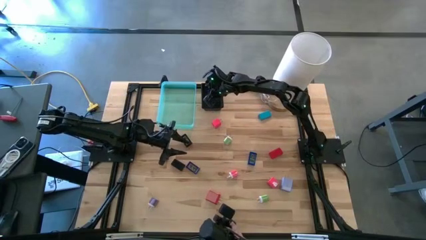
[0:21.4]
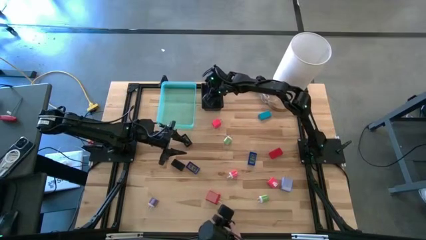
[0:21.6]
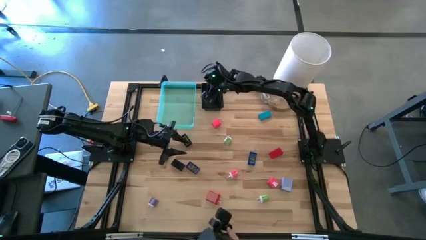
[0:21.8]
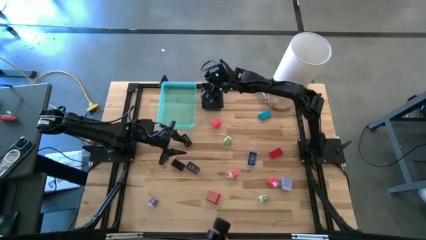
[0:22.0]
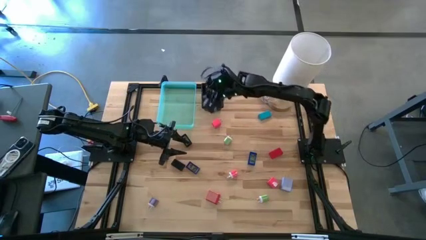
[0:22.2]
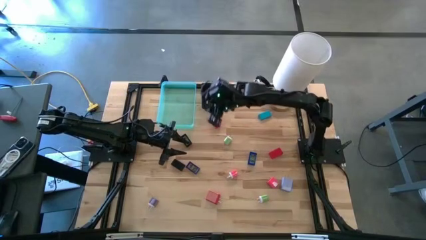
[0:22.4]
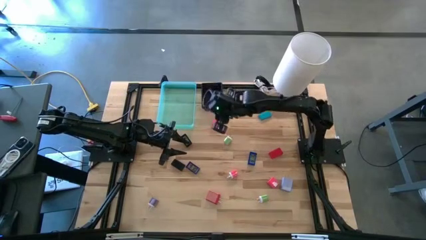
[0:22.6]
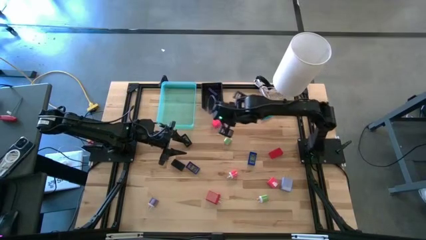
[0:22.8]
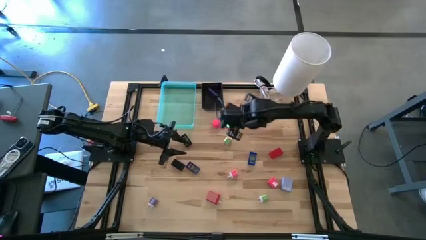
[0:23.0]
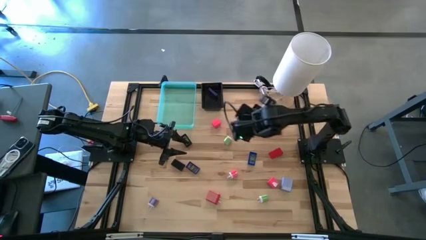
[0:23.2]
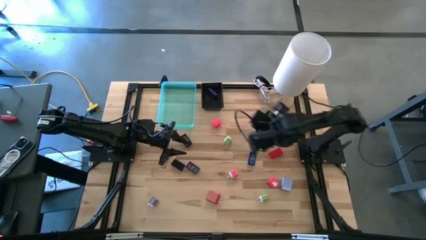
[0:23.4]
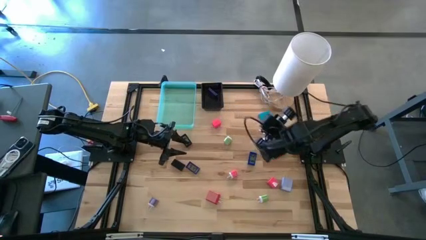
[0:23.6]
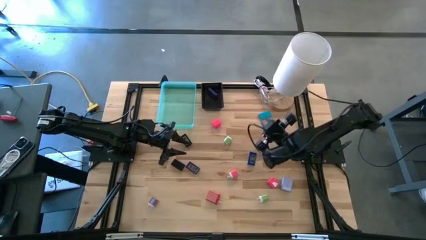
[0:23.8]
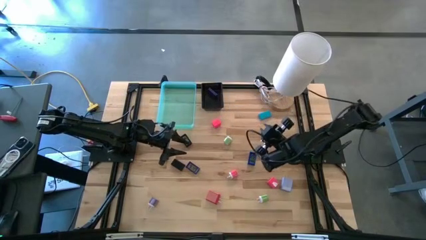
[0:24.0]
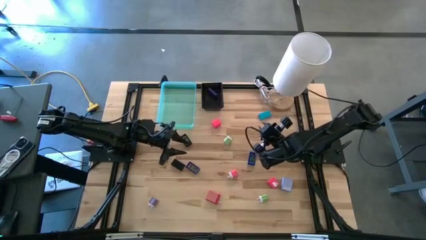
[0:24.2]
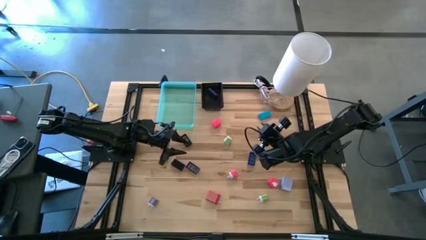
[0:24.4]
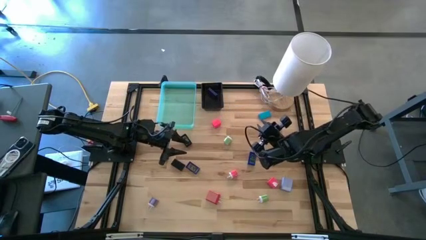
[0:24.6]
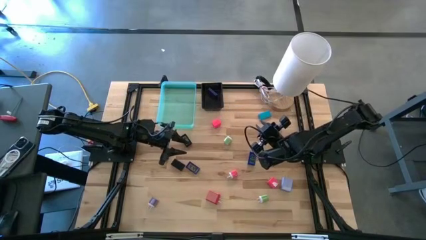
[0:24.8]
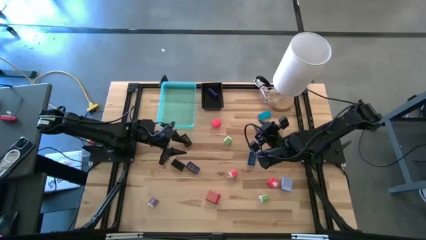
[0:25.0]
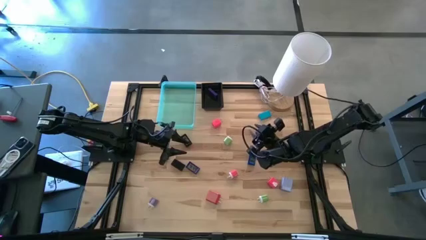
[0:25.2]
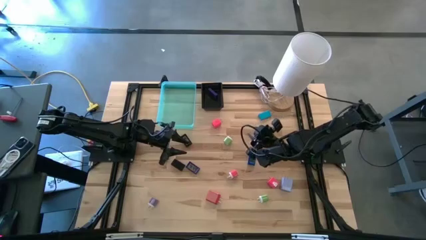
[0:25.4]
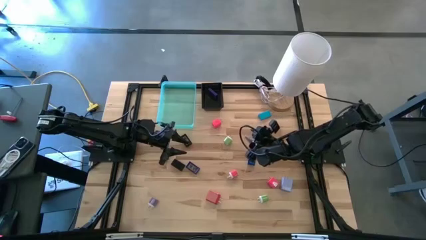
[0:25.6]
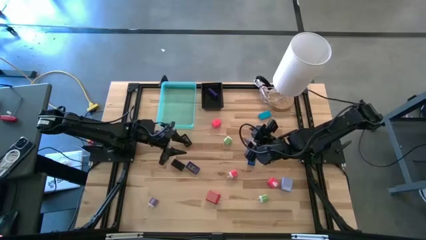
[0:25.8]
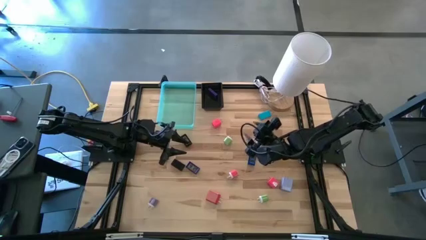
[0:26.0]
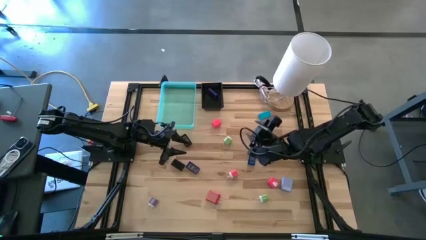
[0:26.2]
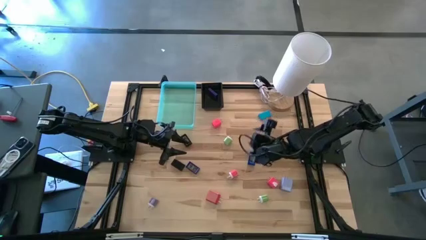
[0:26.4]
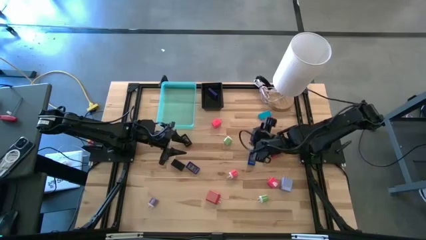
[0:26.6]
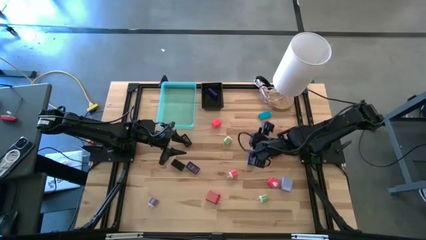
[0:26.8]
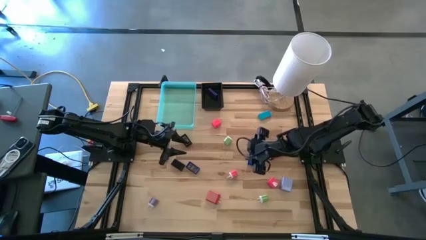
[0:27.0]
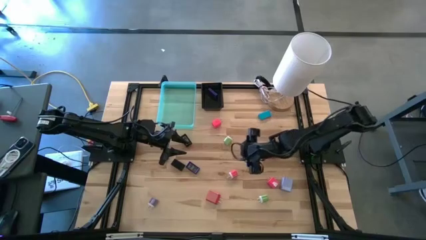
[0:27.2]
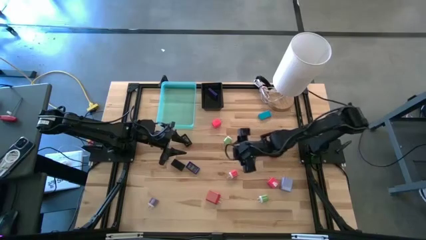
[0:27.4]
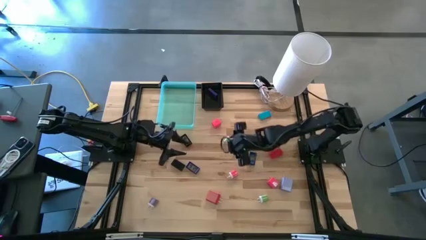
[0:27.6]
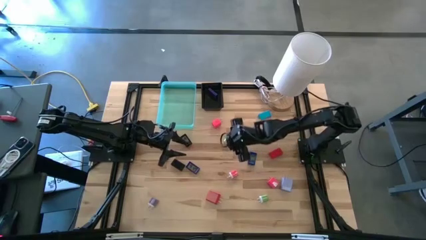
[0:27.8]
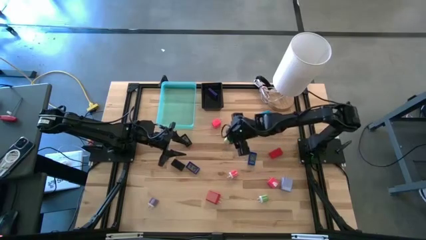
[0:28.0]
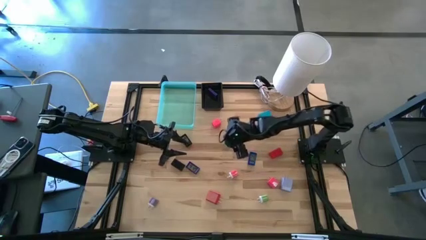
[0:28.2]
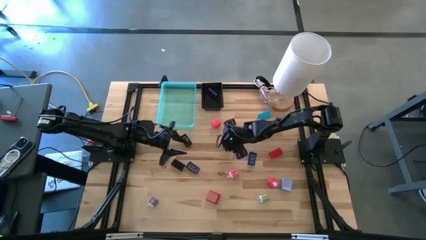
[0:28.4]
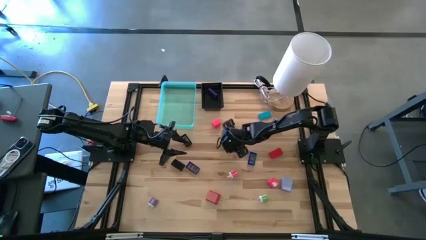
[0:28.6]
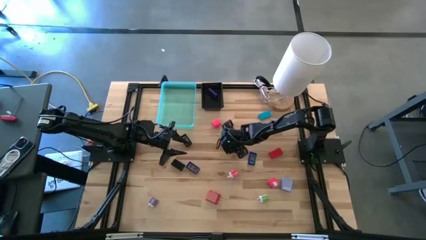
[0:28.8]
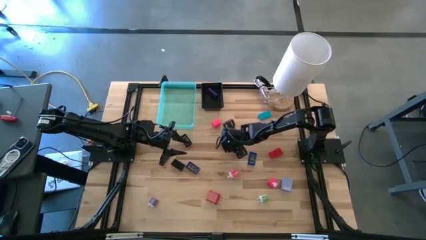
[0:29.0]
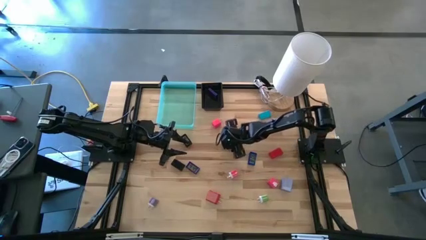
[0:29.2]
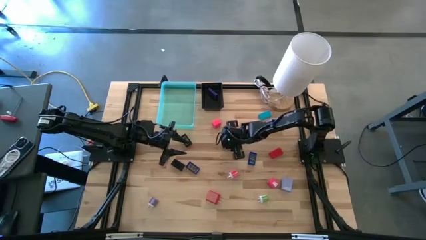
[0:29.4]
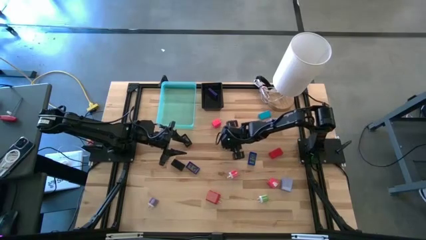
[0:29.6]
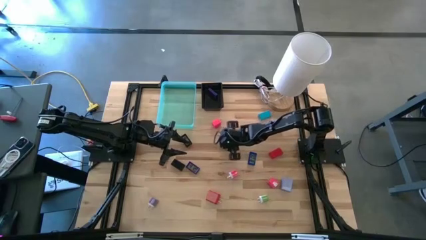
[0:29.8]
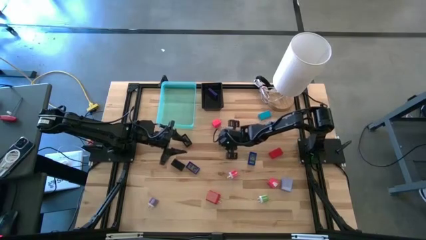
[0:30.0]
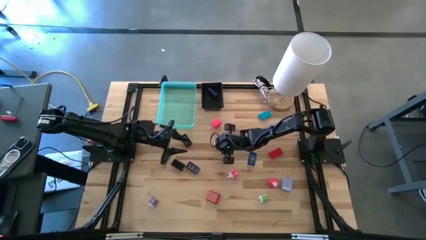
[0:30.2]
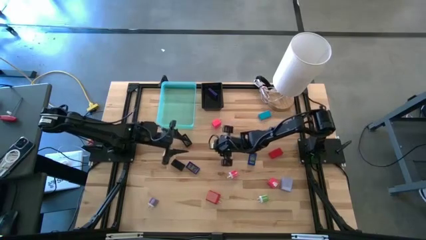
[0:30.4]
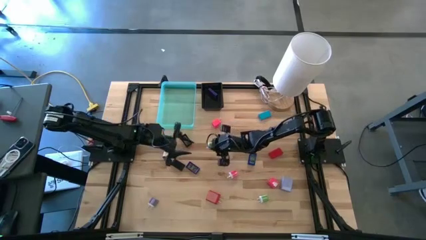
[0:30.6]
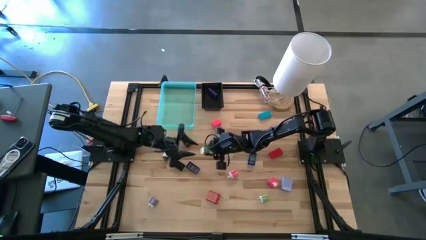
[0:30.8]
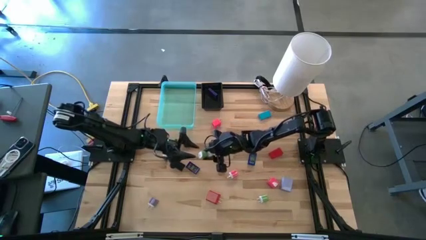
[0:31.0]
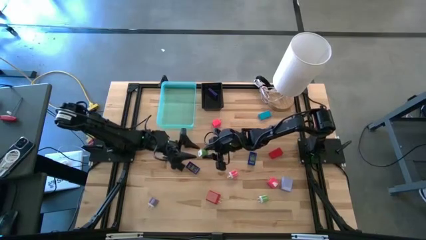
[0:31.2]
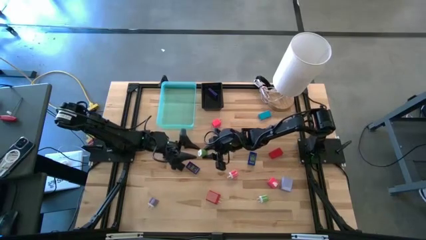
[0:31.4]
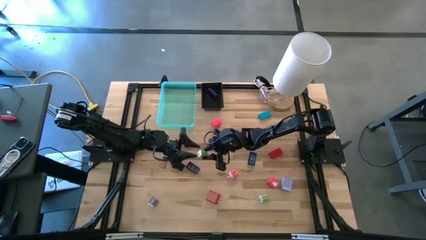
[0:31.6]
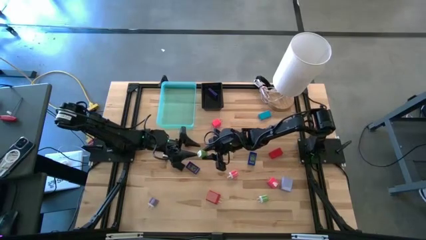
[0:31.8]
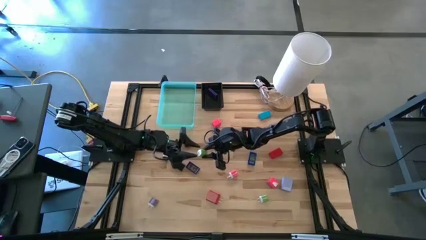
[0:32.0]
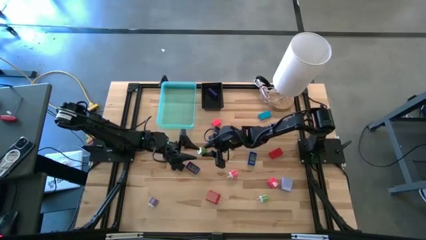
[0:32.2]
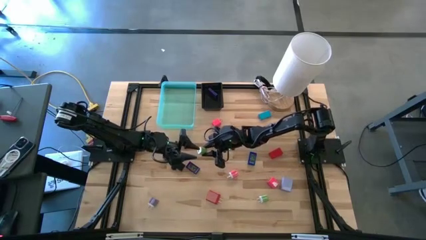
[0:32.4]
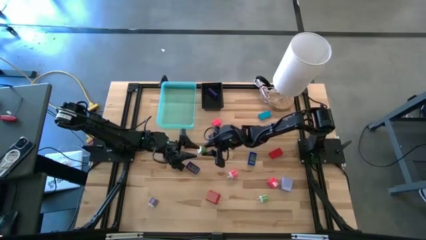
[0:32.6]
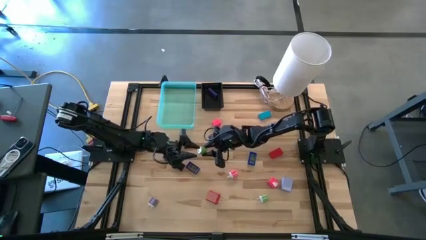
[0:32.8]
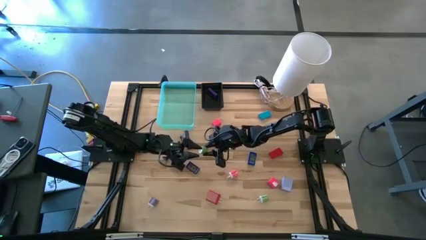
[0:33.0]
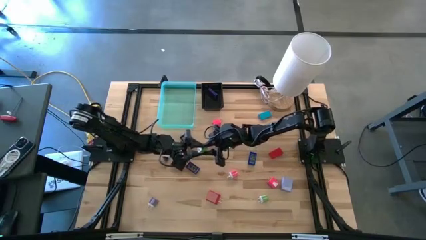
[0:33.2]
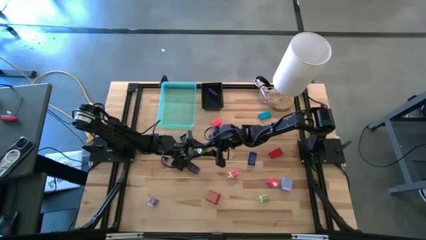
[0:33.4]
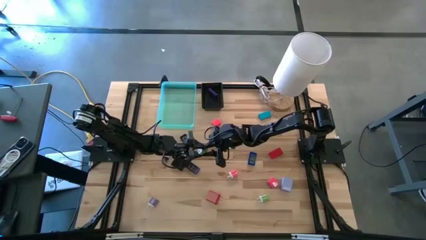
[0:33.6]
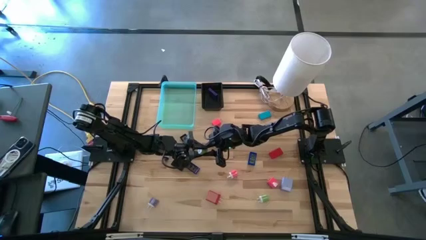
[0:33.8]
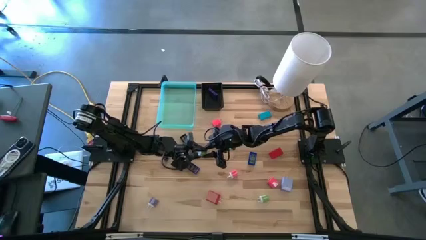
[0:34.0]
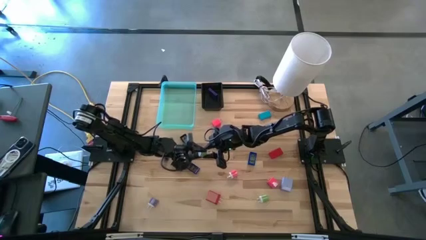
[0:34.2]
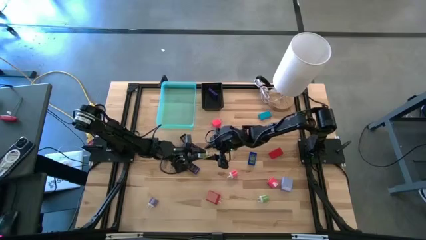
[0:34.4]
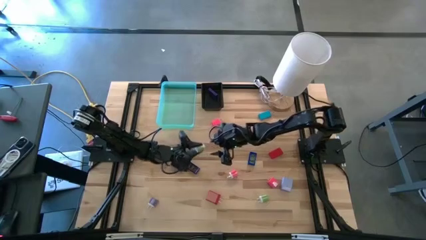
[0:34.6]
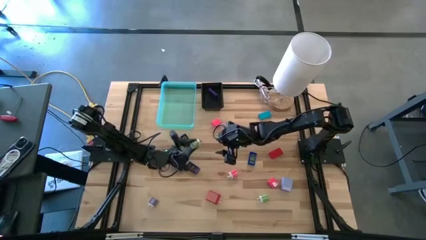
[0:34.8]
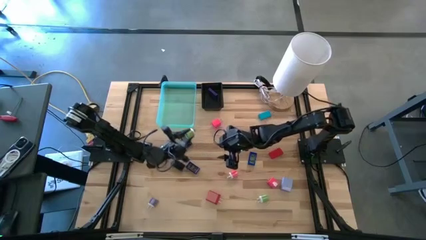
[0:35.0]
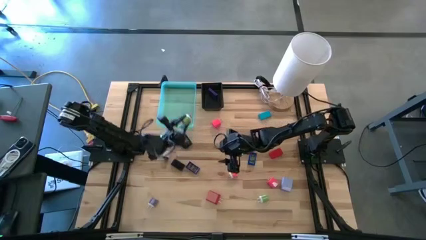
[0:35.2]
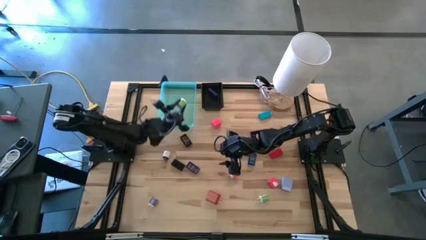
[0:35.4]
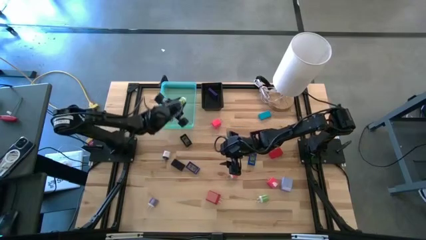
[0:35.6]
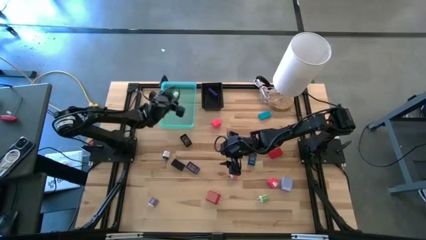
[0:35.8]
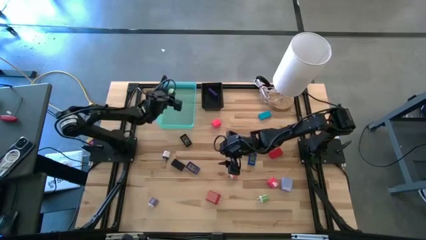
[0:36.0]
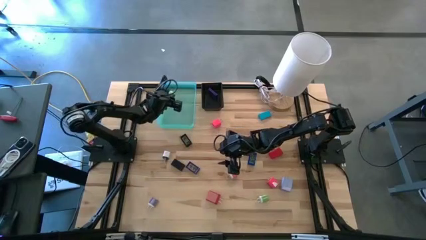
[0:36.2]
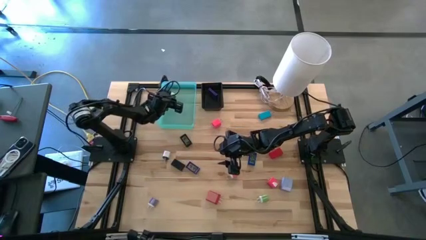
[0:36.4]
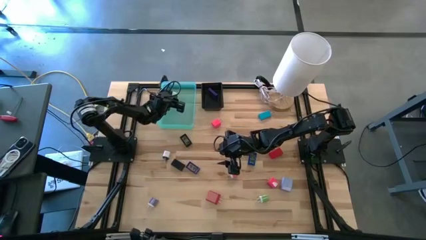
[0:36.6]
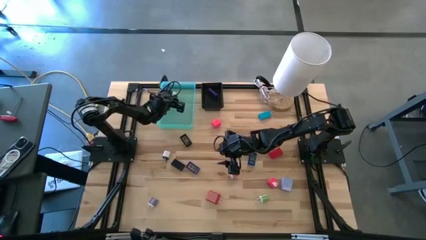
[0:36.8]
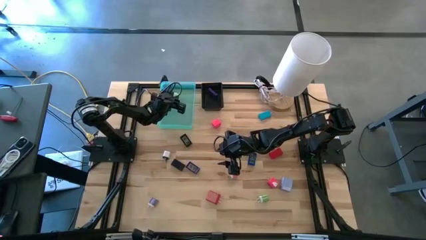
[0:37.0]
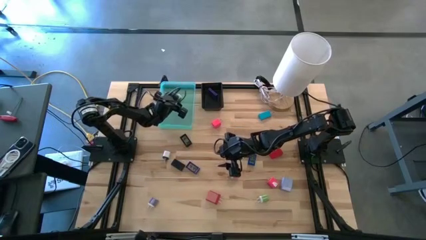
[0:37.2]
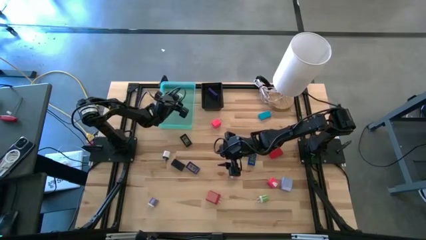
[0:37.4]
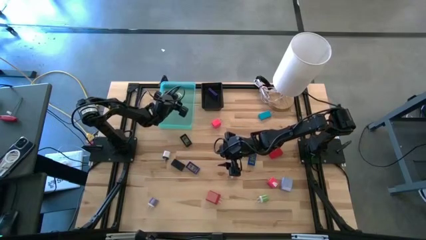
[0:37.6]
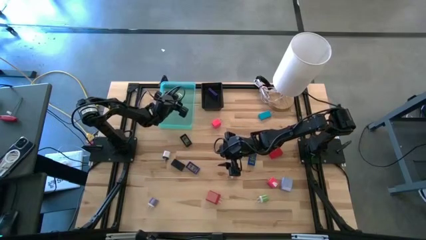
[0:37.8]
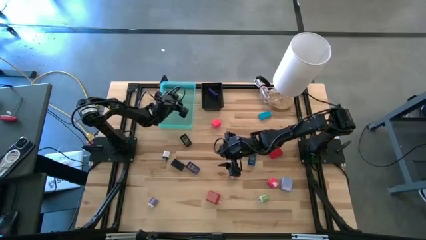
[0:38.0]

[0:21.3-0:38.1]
Task: Pick & Place Office items
Put the top green charger adapter into the green bin
